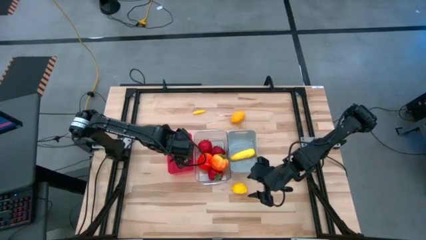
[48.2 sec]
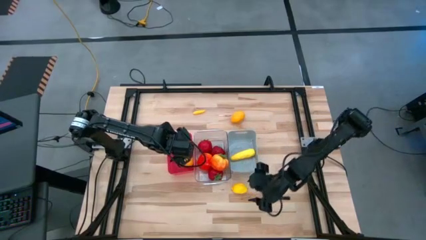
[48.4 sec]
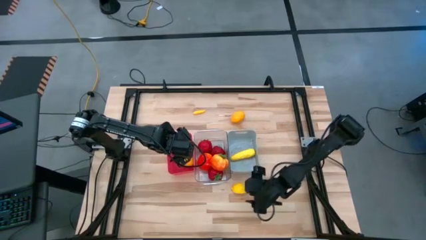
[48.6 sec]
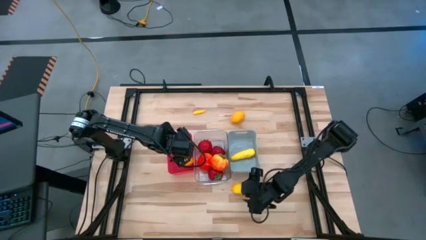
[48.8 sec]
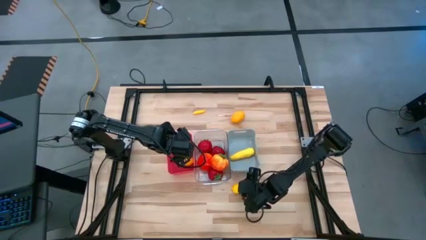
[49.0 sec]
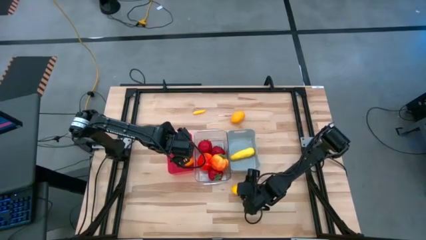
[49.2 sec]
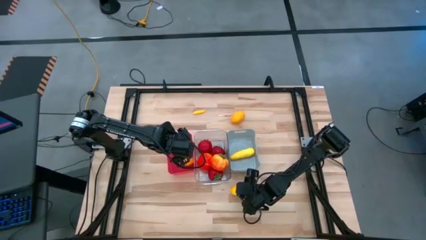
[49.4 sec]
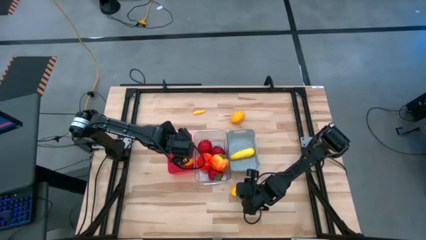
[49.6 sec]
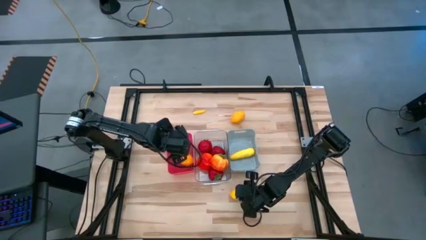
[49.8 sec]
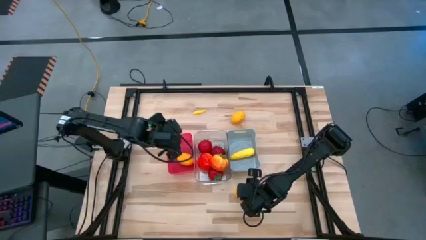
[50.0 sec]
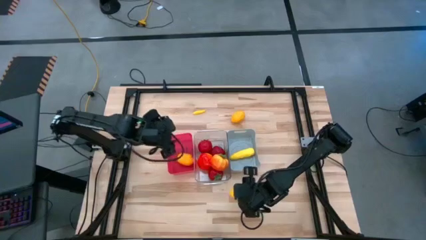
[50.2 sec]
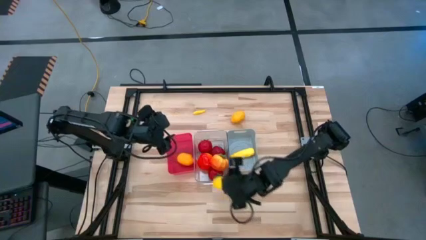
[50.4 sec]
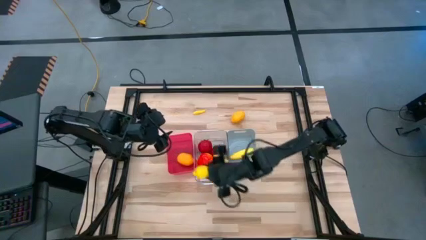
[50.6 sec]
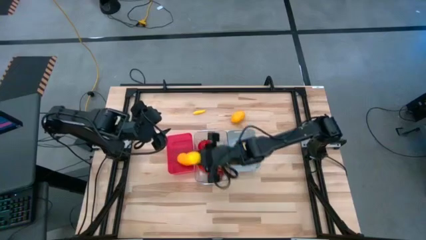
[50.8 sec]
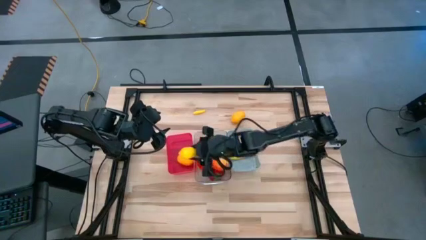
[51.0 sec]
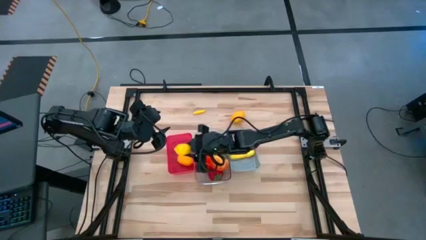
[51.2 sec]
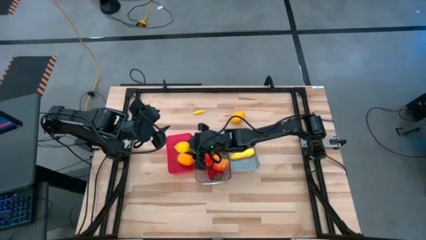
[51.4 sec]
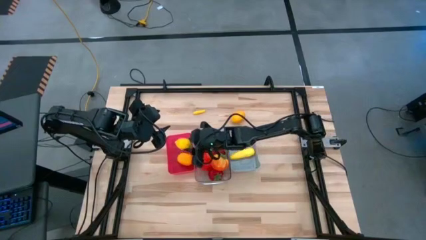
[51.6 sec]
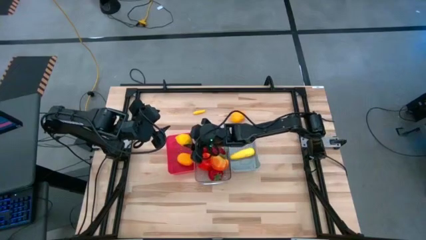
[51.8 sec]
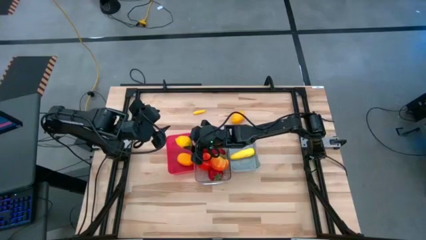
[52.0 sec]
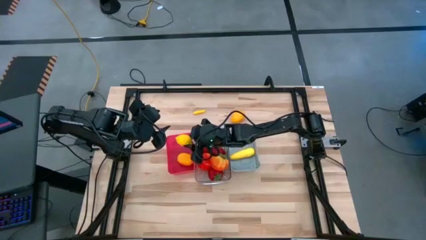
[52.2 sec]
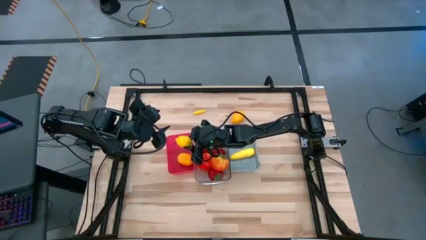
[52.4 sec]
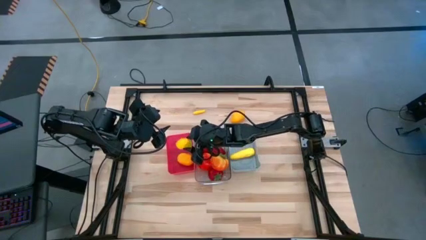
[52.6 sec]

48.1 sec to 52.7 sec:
Task: Sort produce into baskets
Put the bottom yellow lemon into the red bin

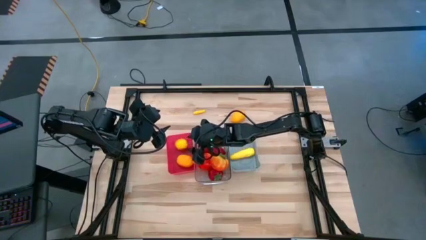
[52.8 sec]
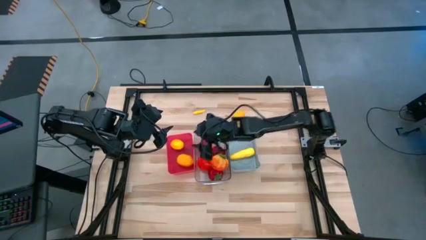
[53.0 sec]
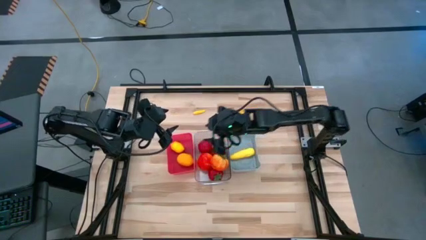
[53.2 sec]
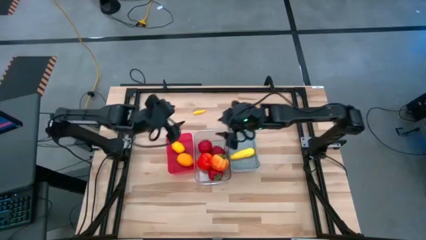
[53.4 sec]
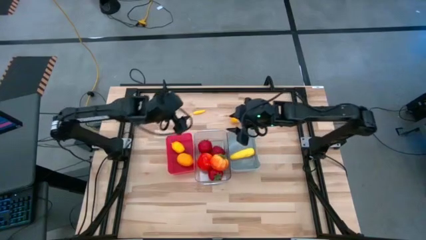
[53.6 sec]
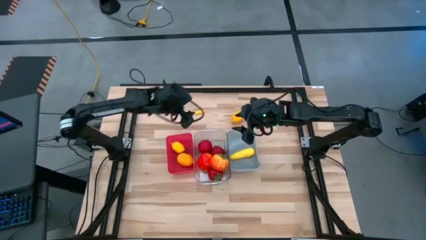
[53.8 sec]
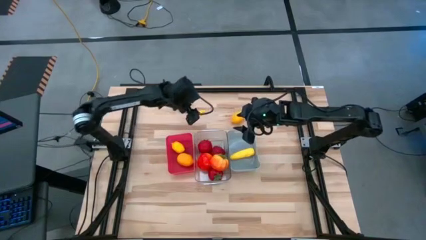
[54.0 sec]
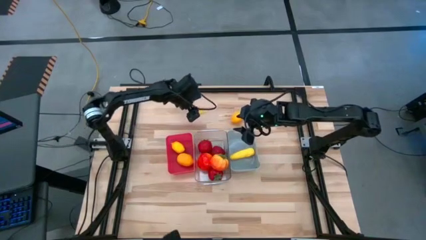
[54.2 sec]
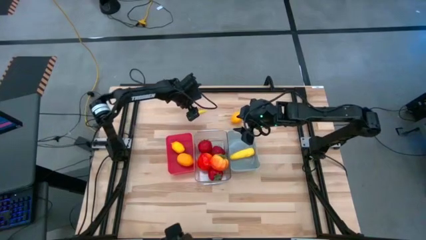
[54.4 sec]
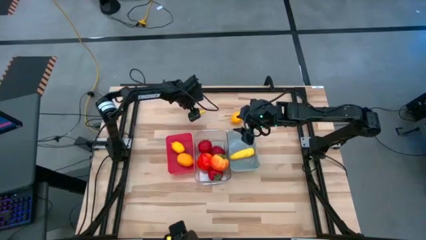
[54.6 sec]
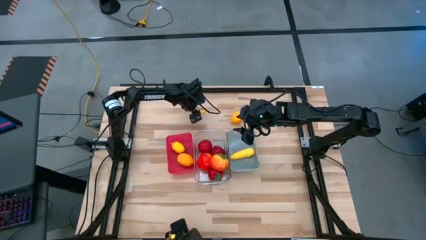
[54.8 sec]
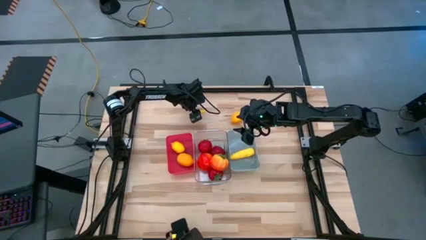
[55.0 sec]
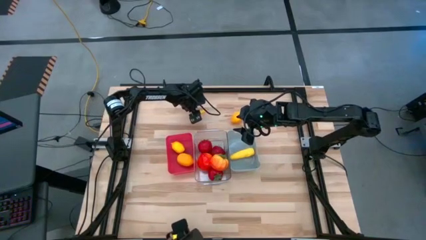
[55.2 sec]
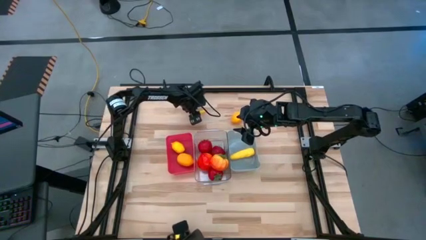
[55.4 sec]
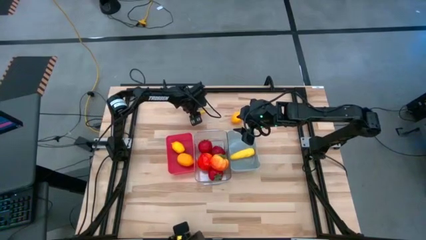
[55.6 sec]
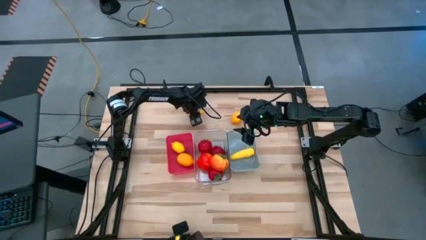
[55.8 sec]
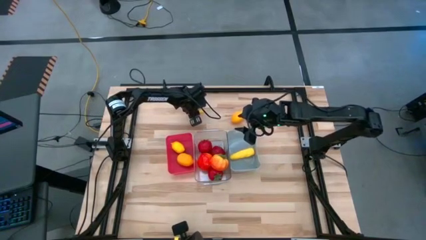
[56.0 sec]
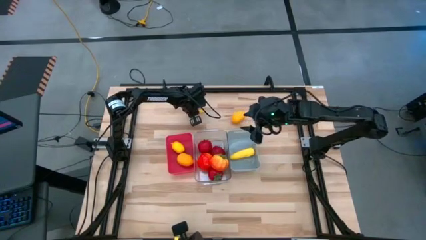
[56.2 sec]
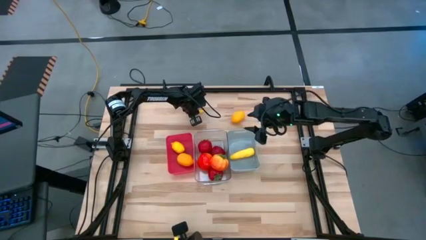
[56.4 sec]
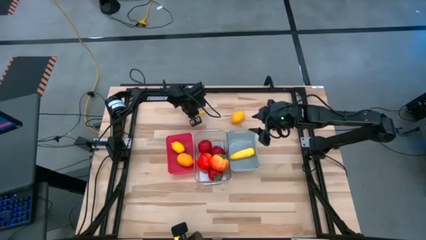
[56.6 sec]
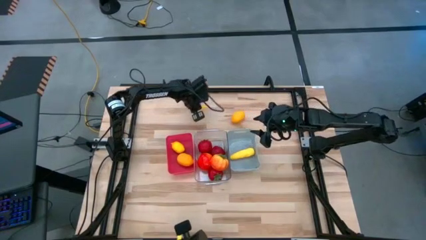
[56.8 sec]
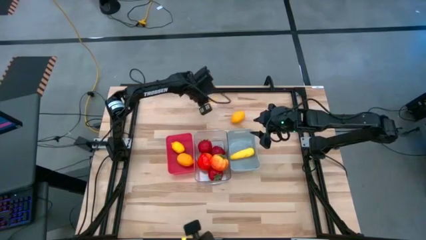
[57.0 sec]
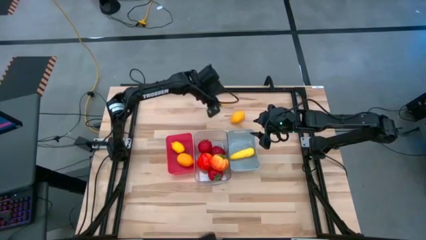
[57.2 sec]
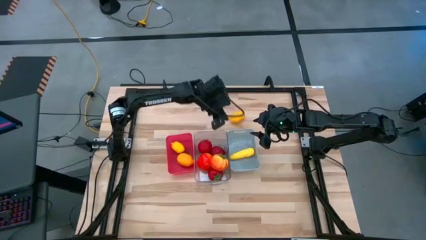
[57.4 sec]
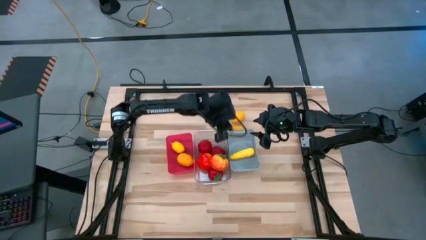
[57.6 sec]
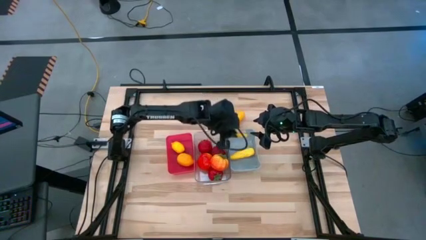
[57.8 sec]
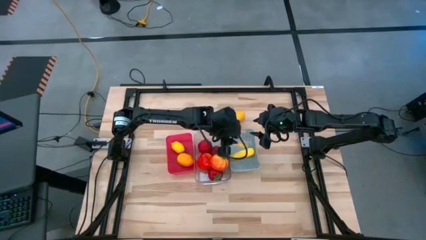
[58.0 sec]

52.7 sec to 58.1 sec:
Put the yellow corn into the gray bin

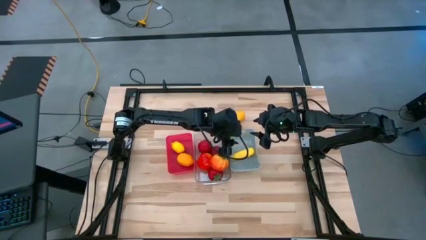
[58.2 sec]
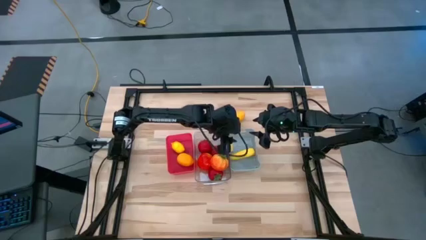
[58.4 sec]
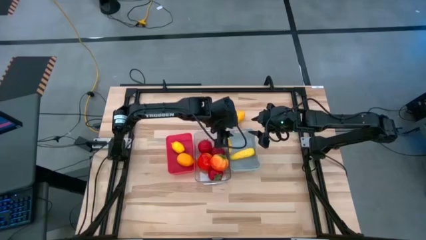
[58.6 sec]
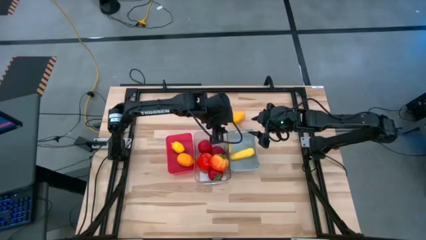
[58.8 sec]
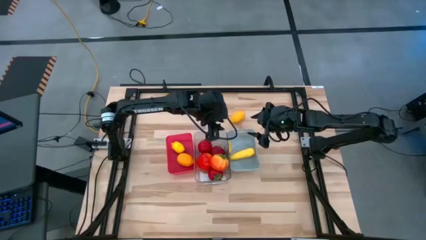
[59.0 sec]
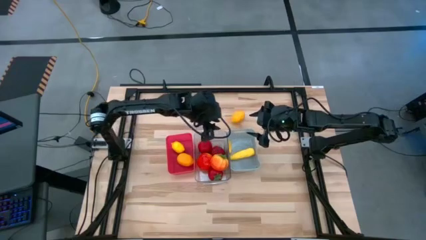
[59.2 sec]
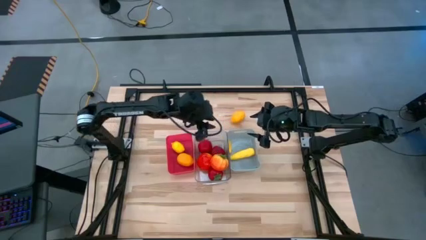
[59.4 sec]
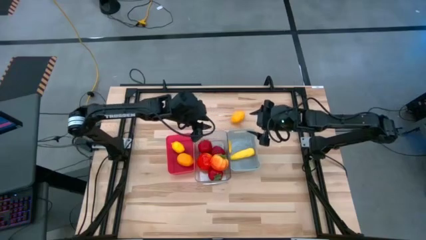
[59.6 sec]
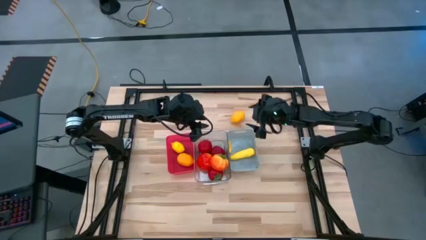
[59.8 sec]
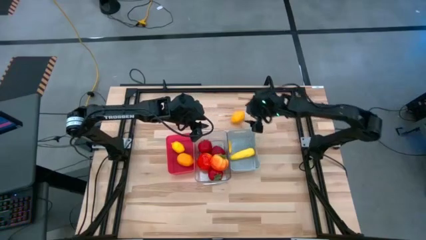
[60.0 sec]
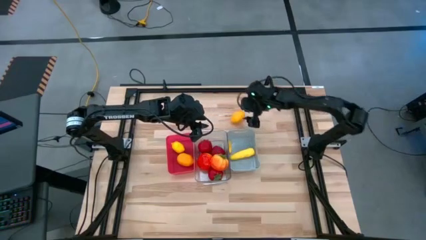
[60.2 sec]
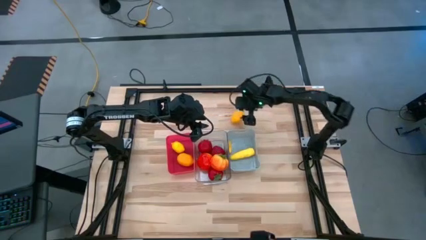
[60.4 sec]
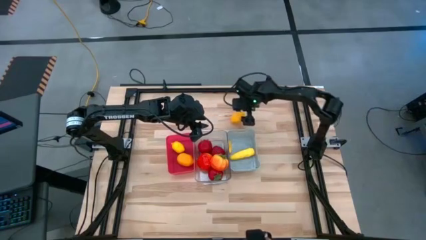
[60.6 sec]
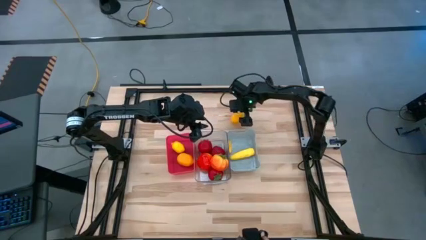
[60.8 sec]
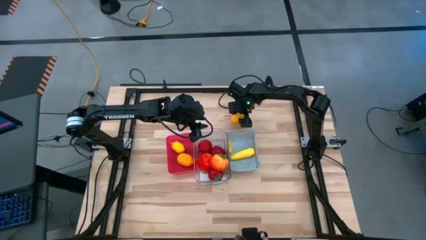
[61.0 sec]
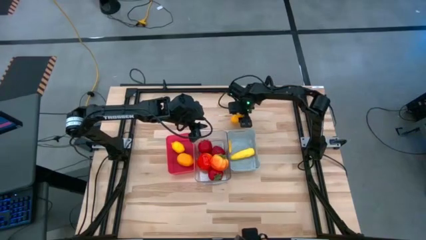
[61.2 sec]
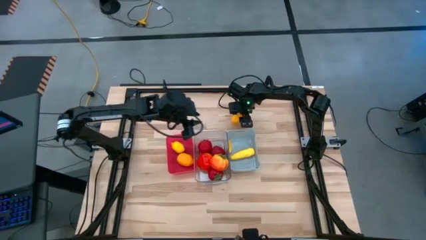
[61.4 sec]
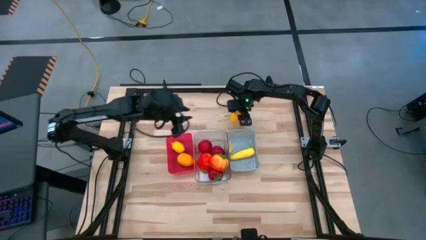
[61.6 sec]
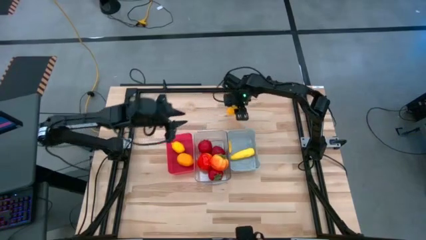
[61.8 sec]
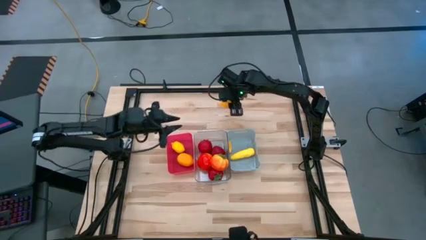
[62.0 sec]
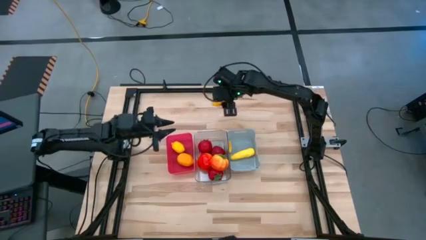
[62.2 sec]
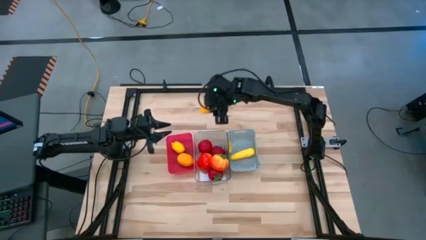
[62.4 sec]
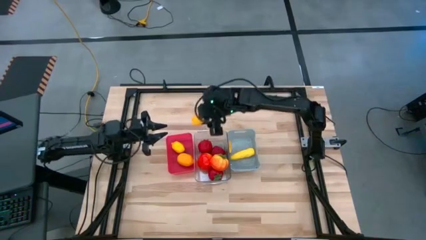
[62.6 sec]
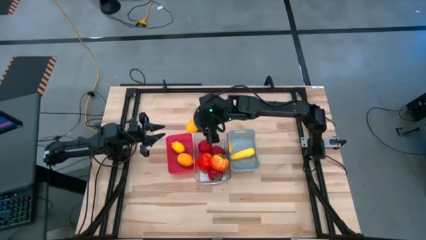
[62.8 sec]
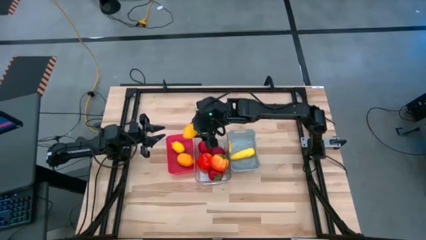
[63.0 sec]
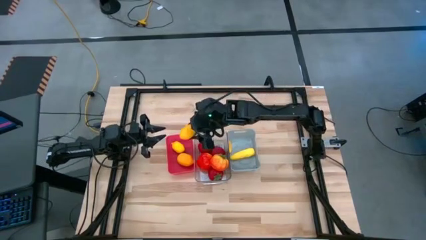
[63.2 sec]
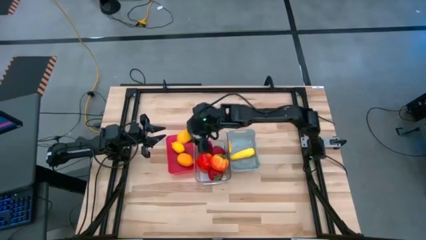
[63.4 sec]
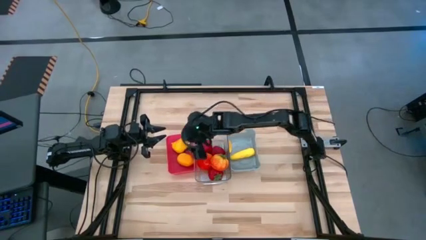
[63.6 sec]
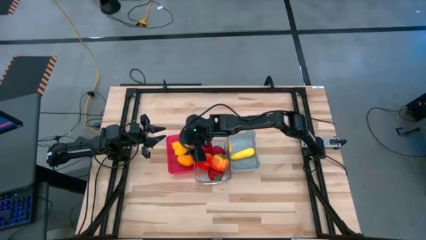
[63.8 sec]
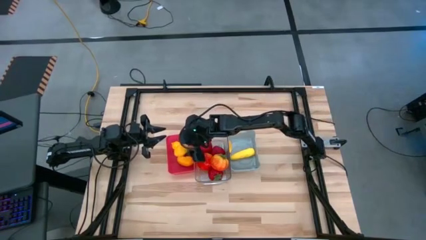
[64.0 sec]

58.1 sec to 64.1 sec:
Put the yellow lemon into the red bin
